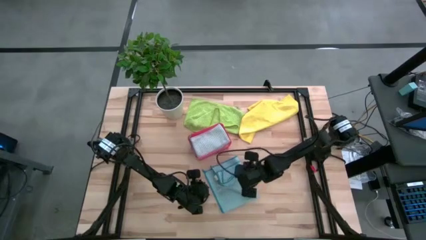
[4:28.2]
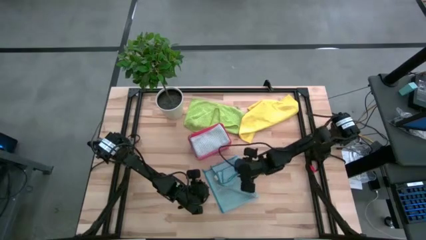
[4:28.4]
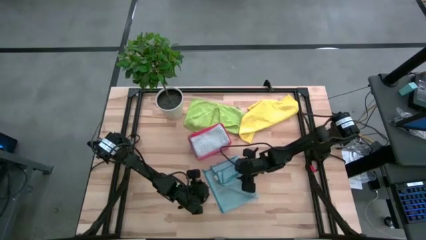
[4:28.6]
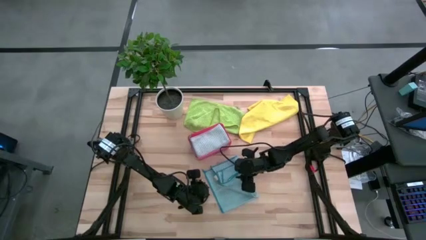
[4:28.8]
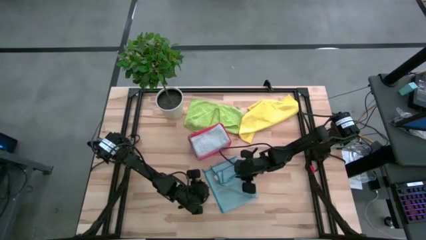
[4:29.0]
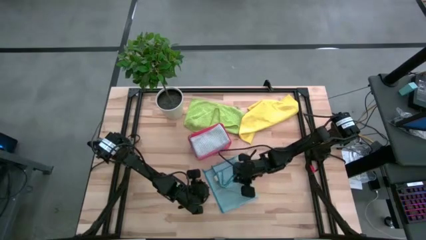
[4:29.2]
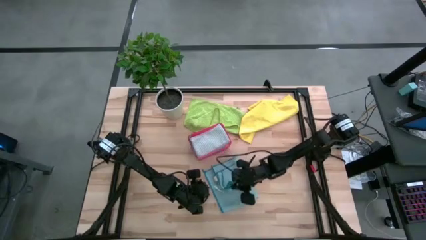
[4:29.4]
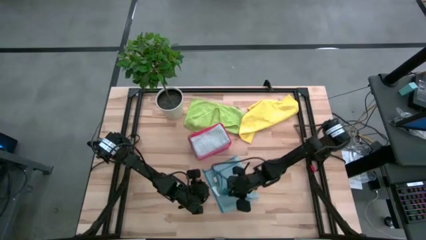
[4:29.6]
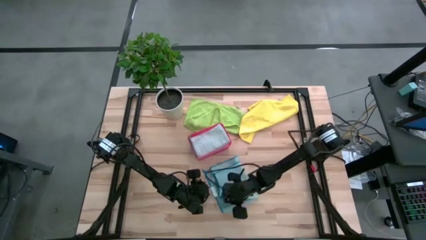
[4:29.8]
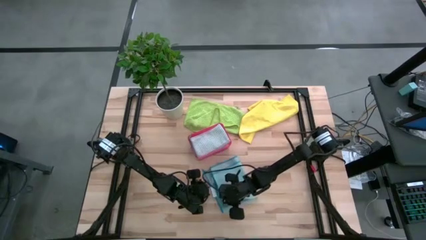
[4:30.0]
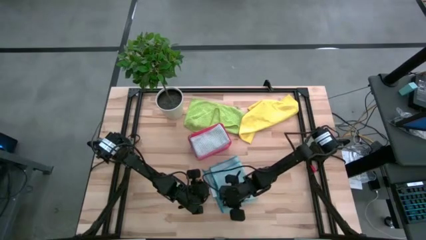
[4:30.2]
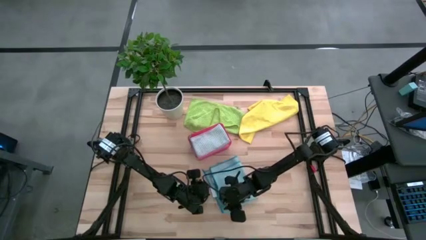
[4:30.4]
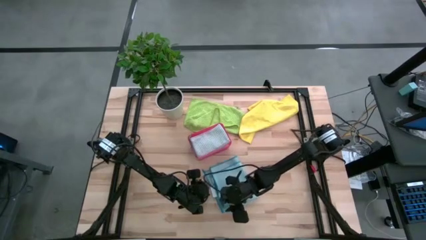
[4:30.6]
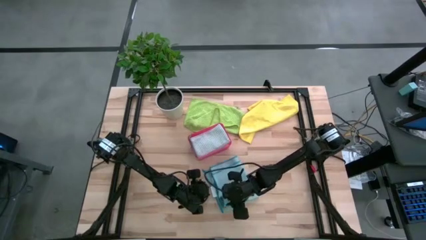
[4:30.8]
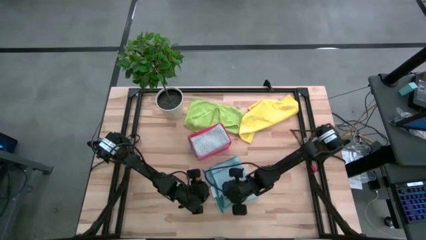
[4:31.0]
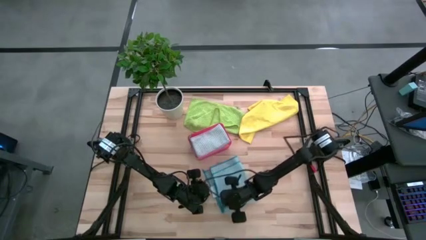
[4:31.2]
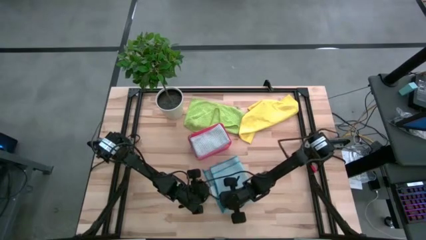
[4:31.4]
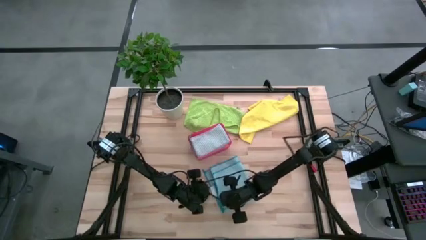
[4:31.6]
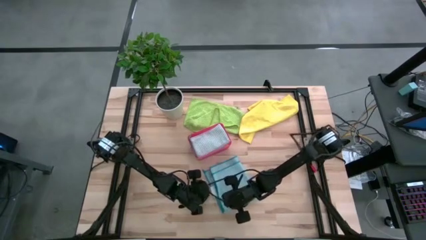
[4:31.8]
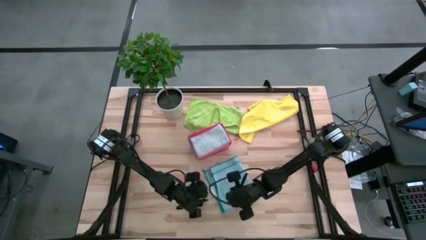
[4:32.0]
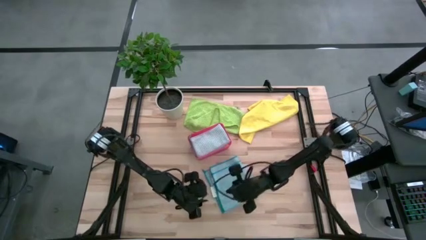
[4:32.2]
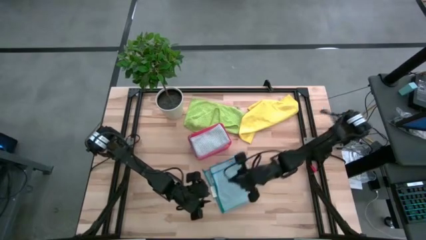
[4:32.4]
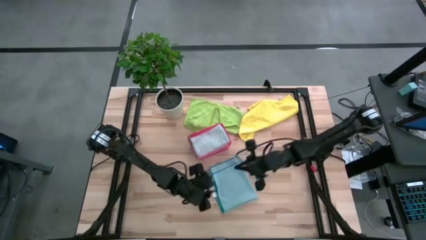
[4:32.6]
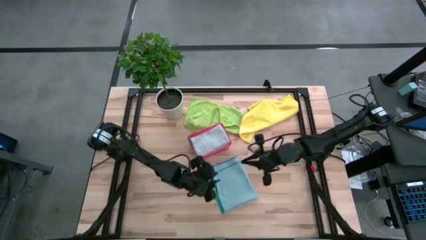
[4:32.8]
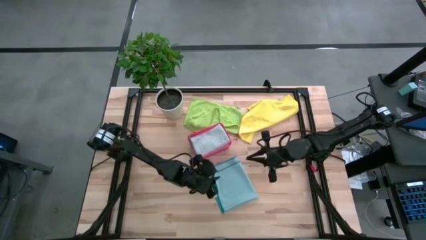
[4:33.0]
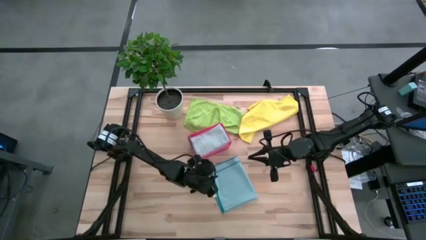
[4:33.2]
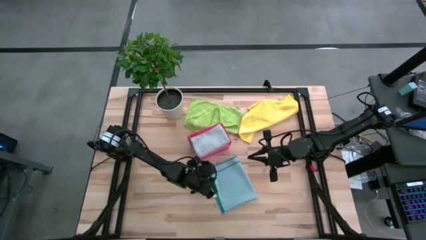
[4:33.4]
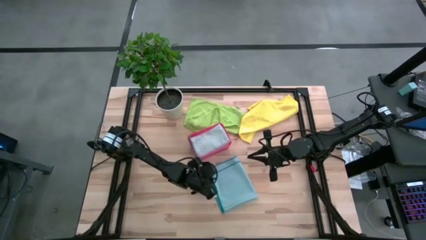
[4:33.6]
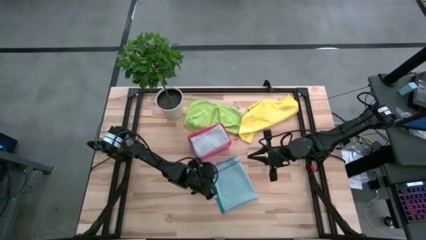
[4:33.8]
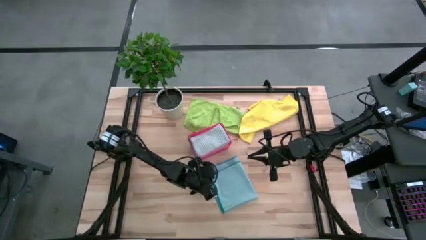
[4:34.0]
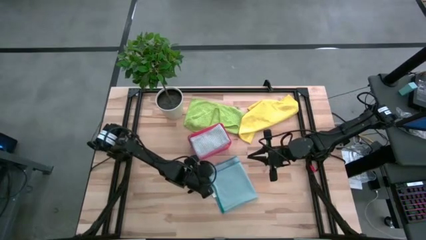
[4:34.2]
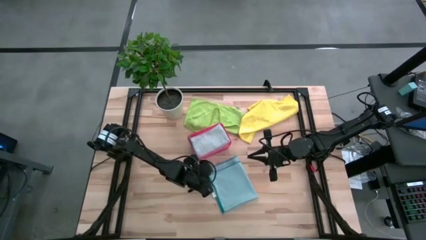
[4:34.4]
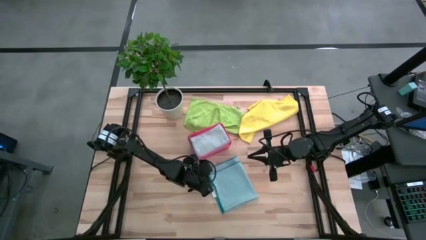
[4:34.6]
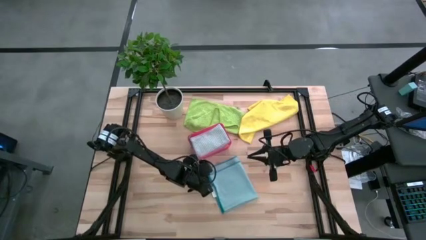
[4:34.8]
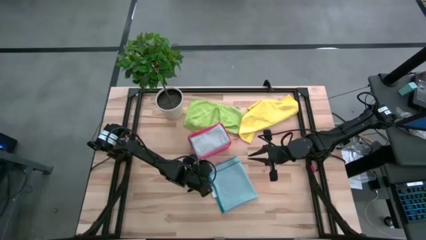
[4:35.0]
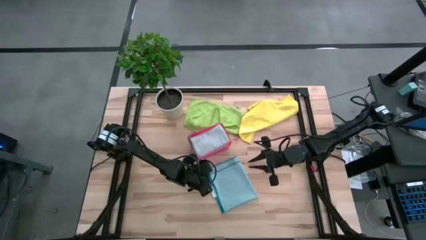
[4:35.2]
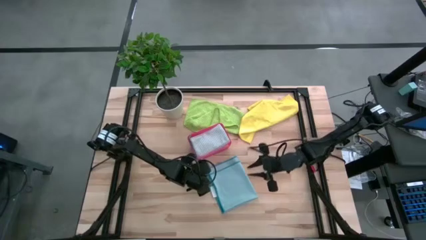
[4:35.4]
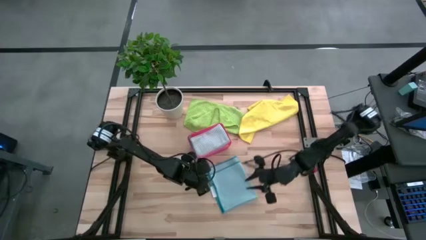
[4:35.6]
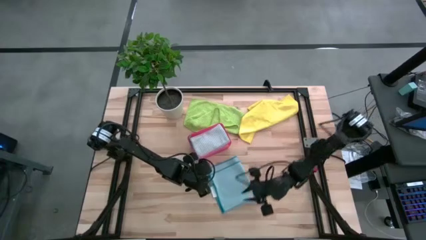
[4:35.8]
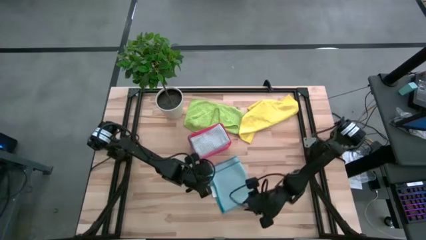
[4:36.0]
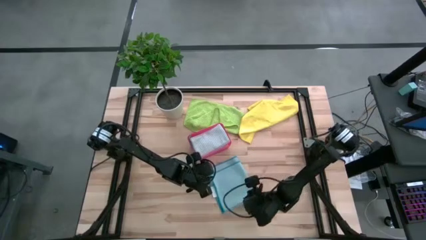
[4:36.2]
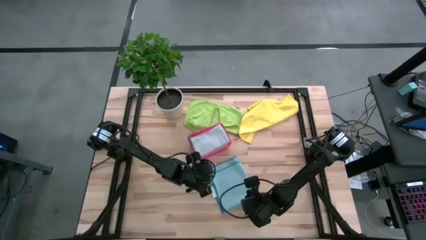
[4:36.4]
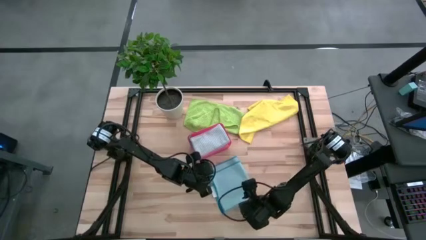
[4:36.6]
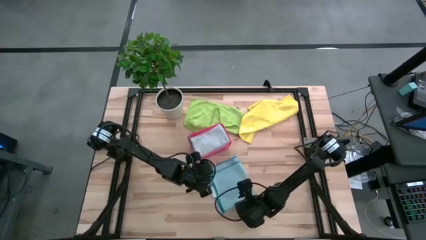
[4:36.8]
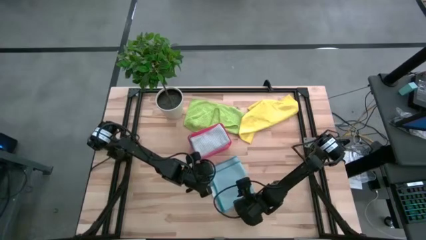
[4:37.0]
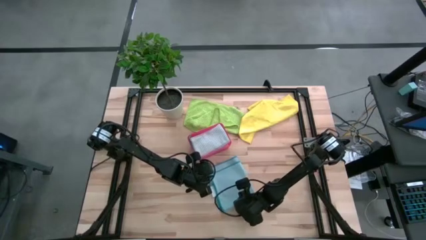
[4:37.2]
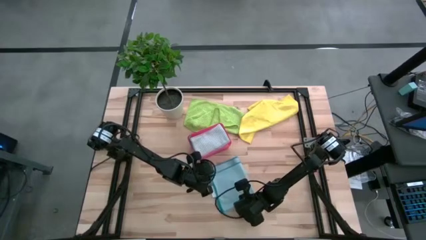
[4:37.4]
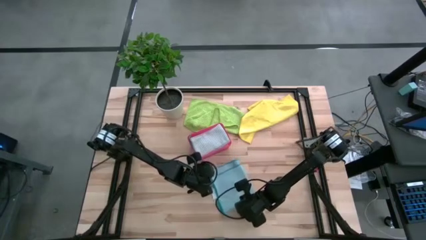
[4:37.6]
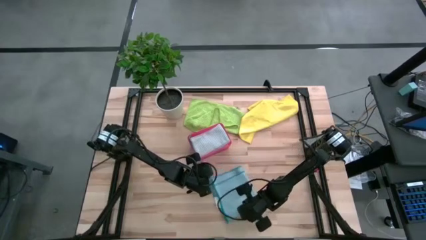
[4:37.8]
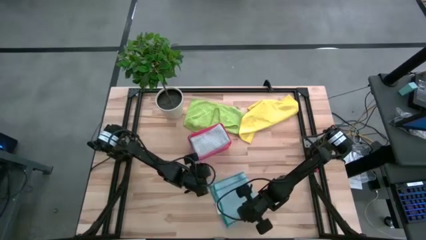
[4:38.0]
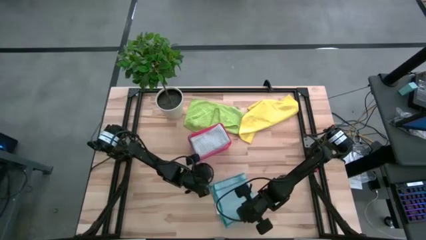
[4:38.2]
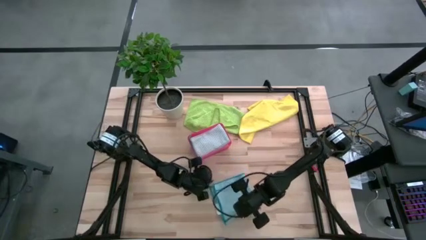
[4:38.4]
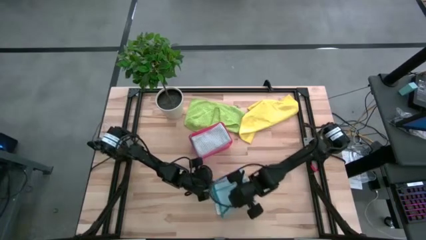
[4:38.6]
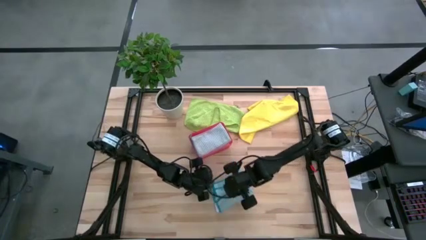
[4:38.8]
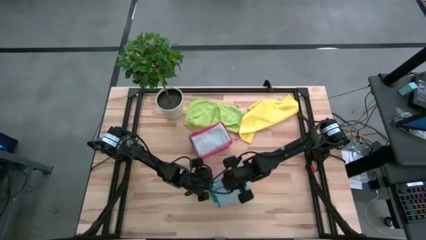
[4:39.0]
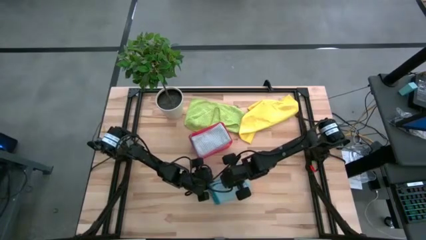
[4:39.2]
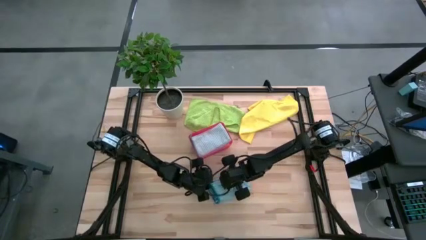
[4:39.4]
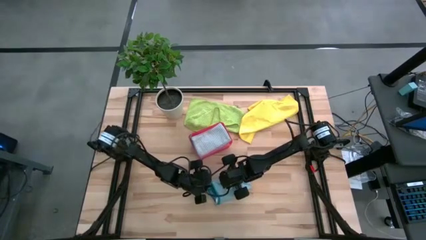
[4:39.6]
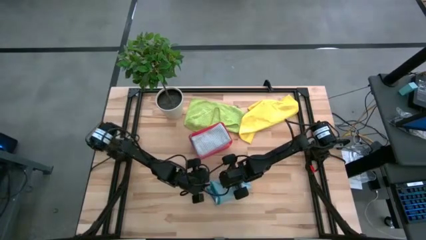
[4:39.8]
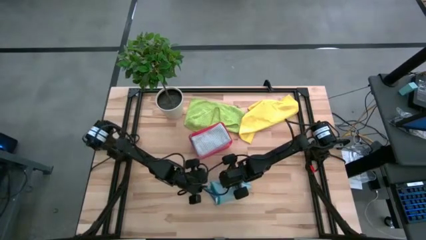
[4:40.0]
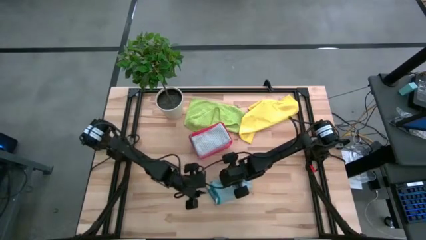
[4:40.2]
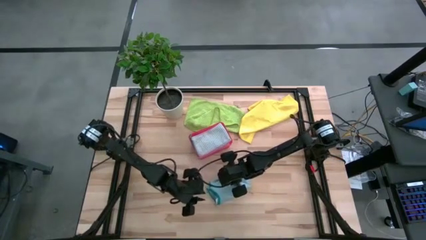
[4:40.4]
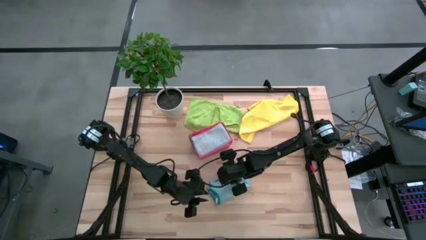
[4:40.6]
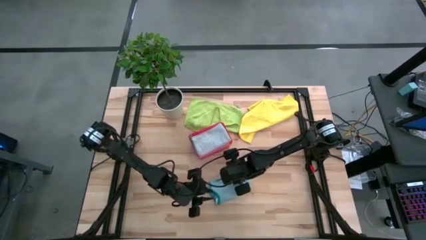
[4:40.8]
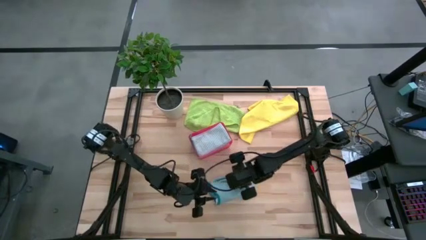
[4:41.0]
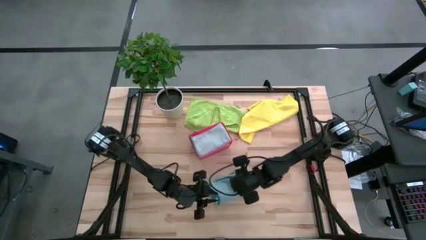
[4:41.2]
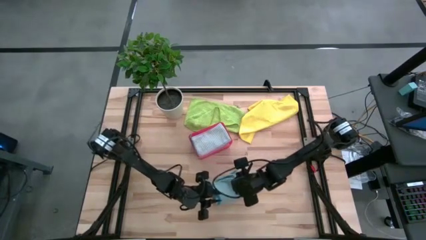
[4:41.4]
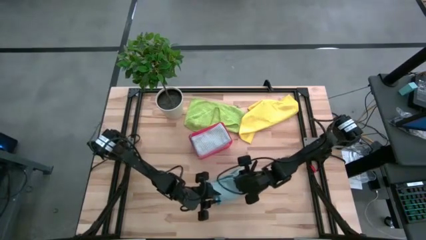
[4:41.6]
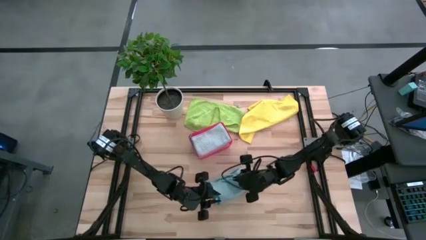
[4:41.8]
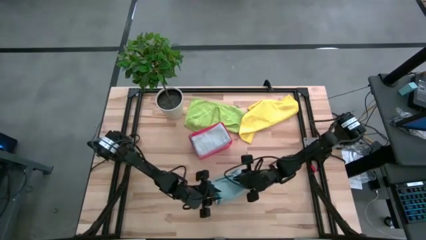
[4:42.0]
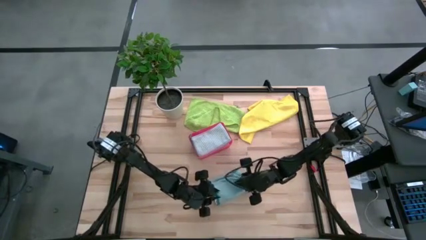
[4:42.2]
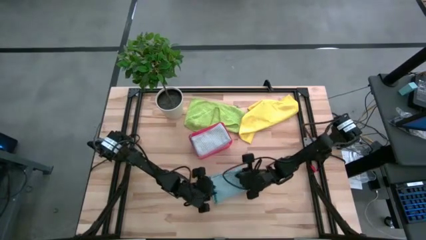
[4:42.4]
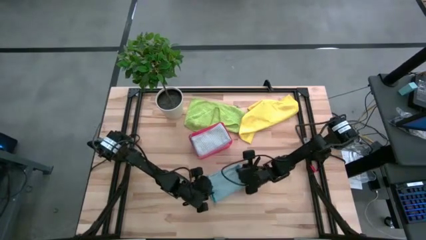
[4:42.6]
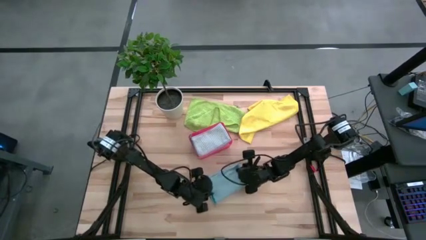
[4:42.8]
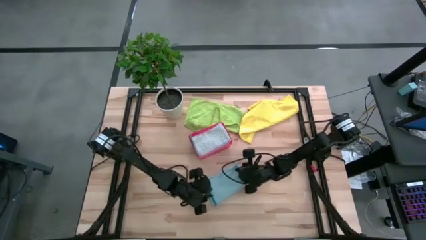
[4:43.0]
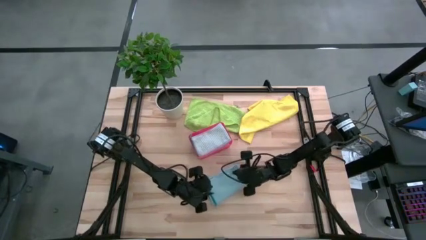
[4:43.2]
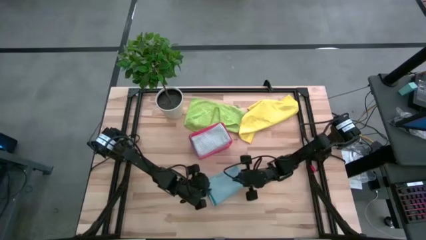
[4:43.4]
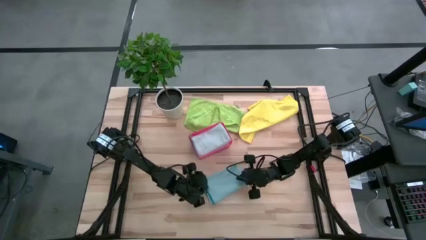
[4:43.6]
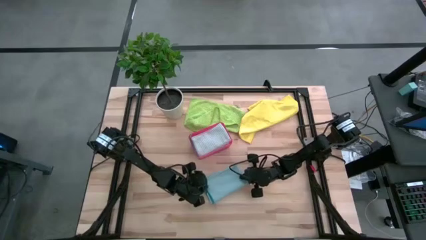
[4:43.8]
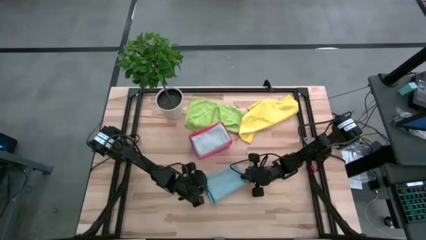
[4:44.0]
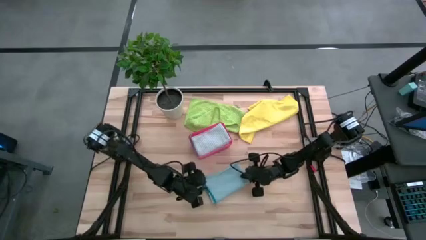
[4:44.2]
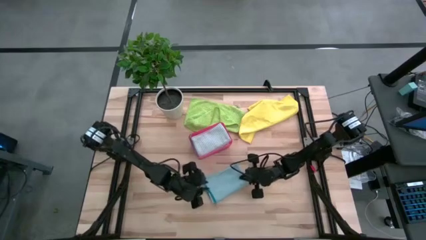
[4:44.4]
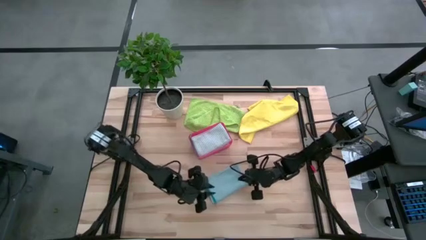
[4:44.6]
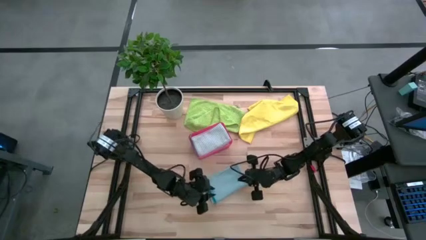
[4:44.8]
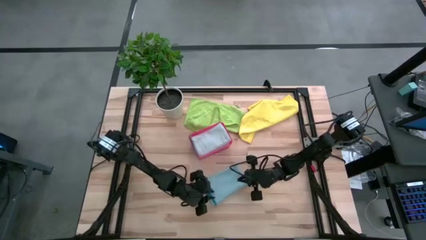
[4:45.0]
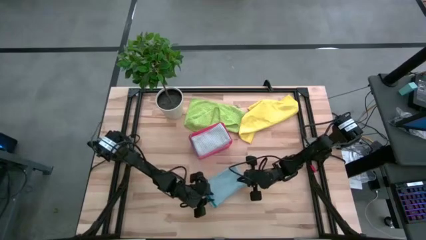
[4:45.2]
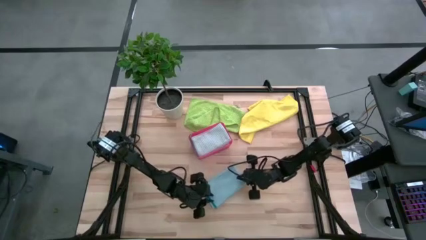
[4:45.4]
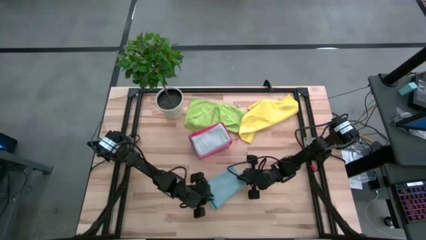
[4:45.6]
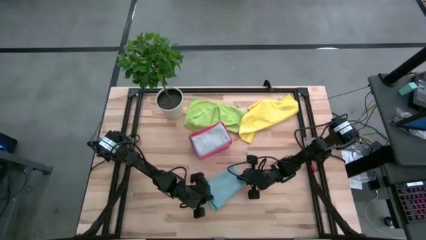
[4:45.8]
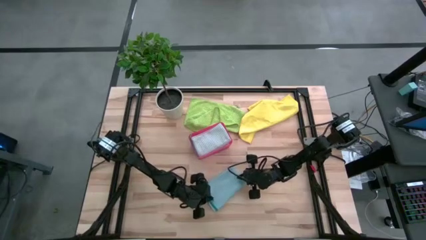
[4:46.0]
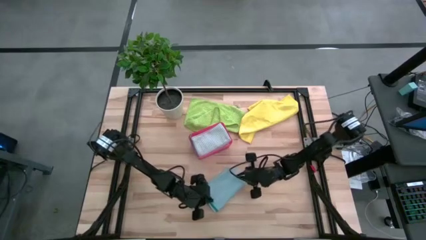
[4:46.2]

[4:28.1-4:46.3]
Task: Fold microfiber towels
Fold the blue microfiber cloth
